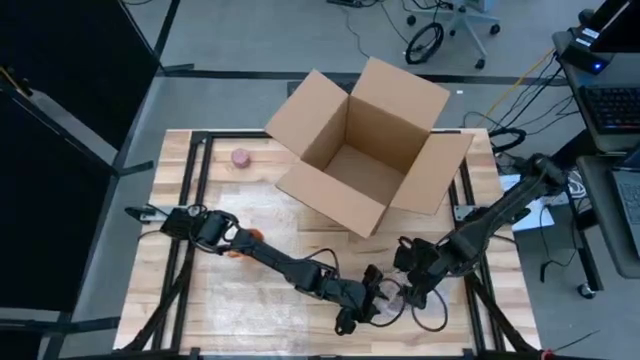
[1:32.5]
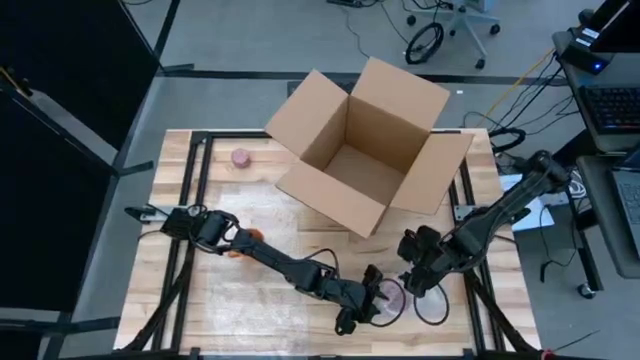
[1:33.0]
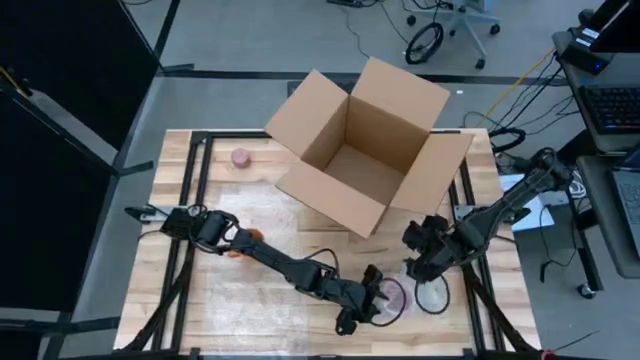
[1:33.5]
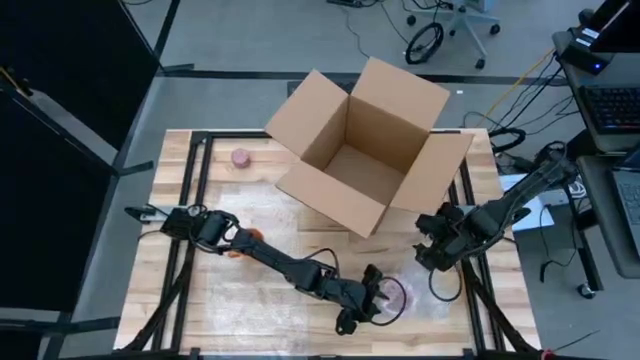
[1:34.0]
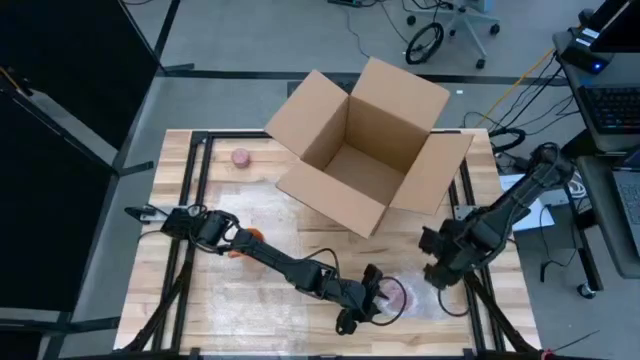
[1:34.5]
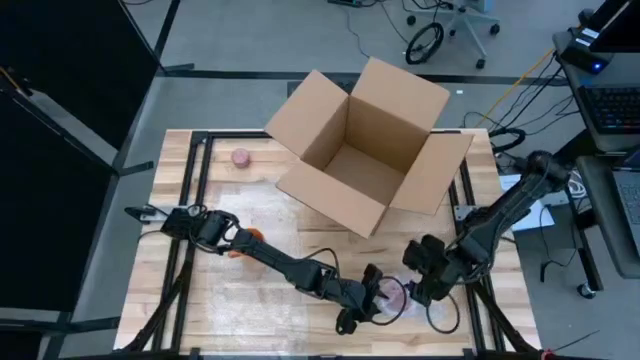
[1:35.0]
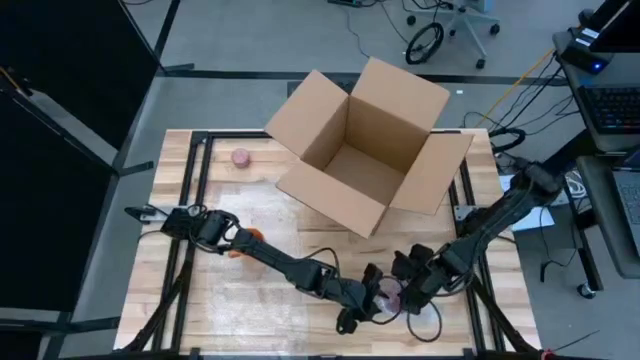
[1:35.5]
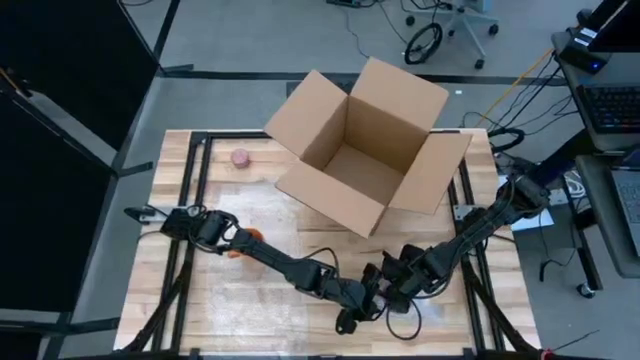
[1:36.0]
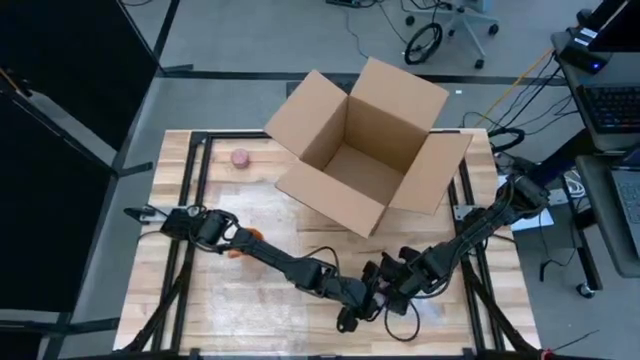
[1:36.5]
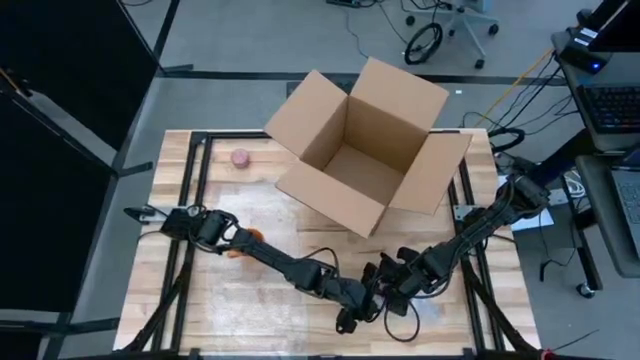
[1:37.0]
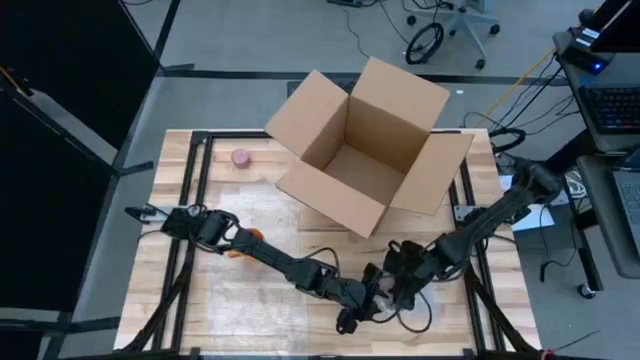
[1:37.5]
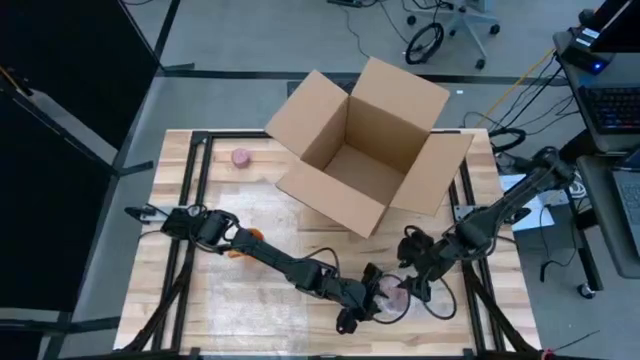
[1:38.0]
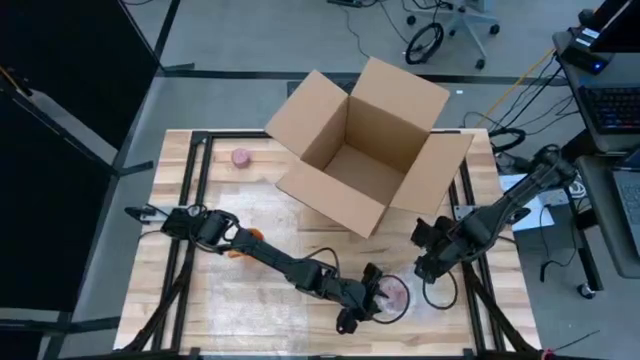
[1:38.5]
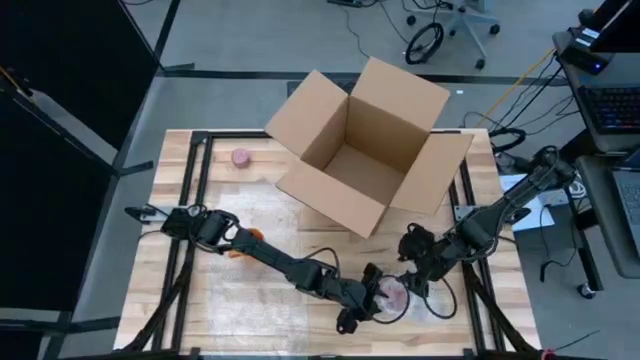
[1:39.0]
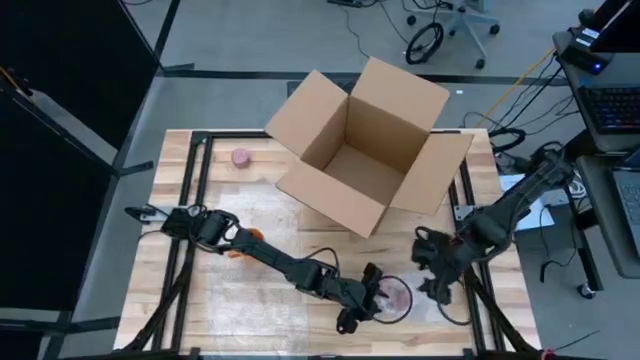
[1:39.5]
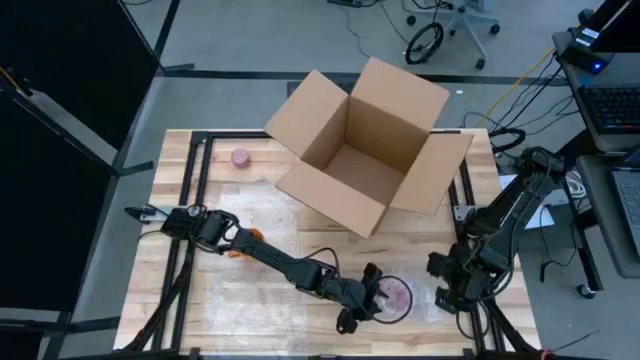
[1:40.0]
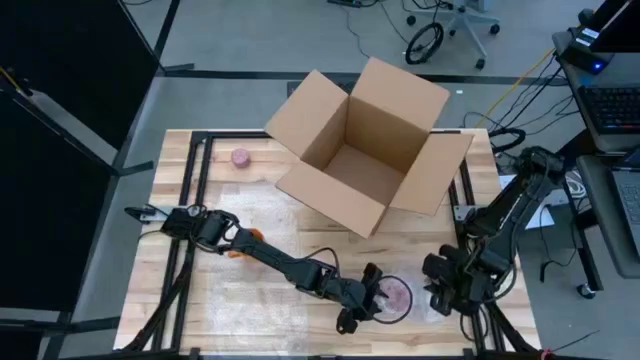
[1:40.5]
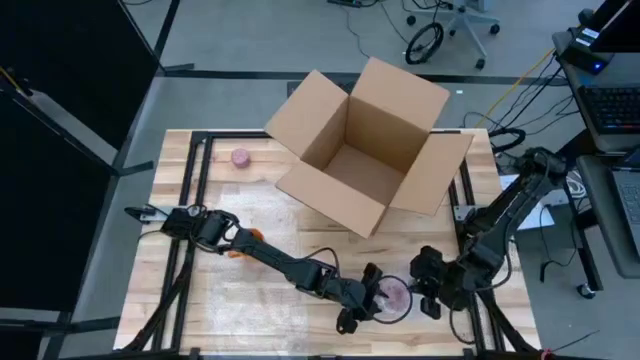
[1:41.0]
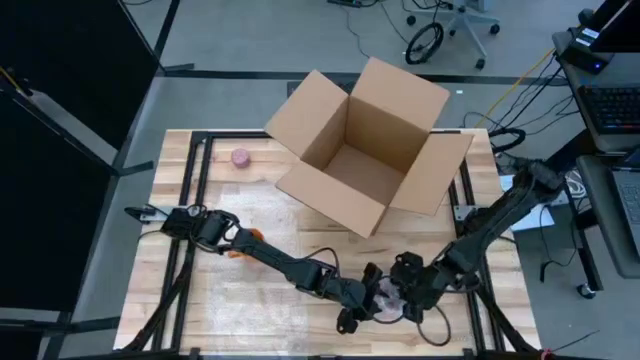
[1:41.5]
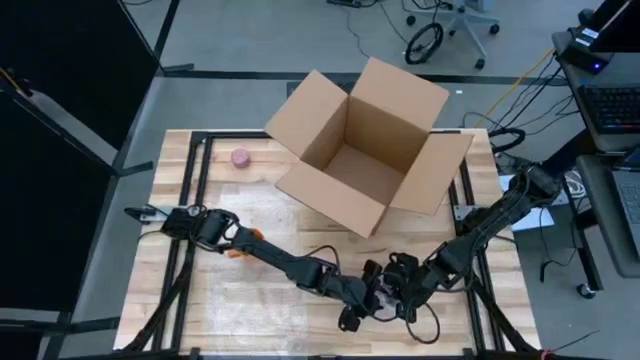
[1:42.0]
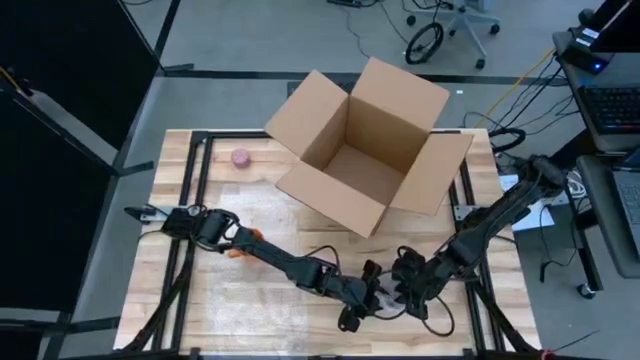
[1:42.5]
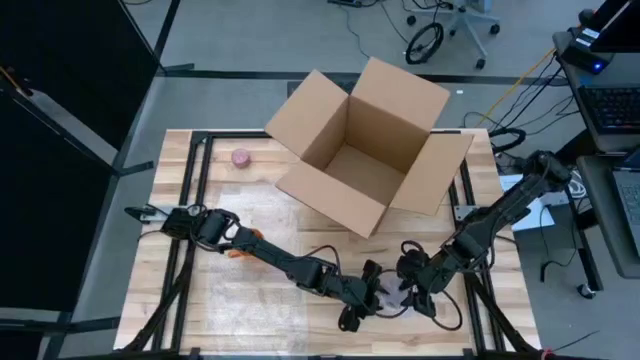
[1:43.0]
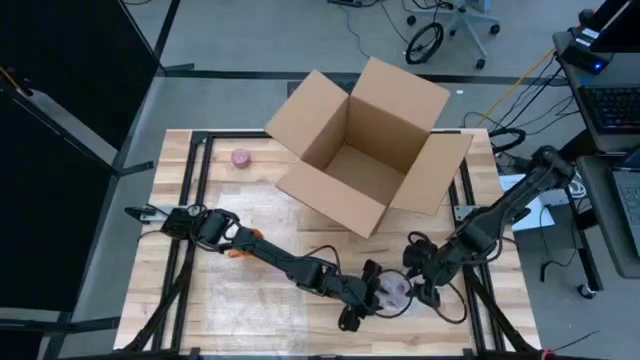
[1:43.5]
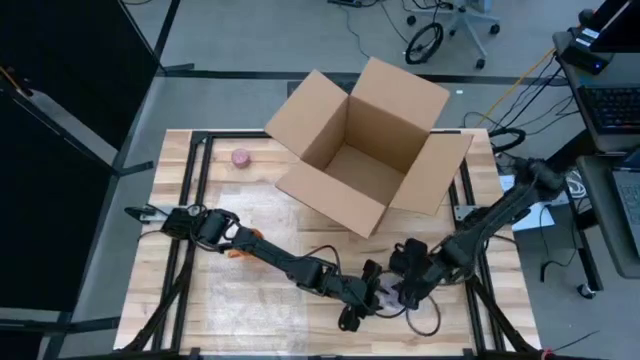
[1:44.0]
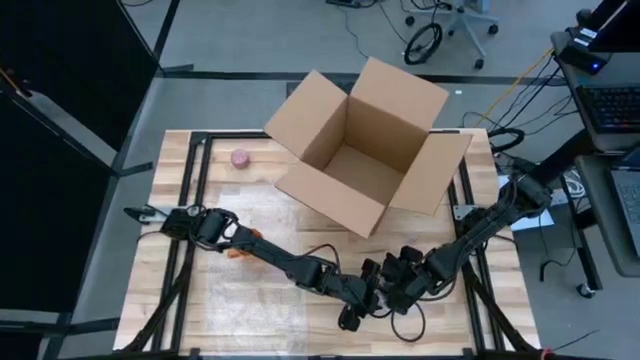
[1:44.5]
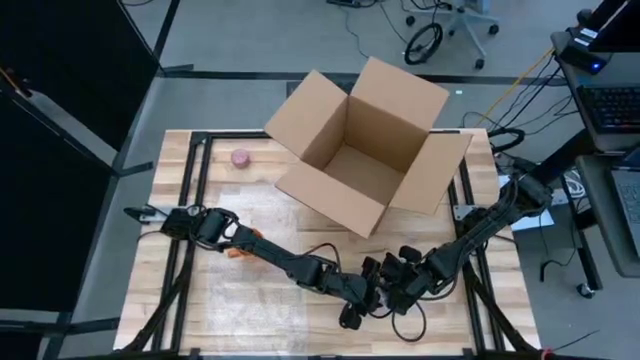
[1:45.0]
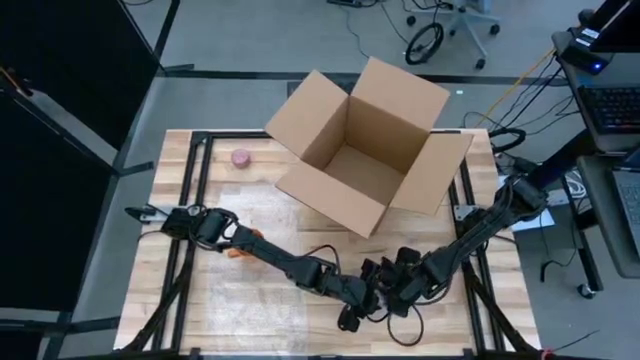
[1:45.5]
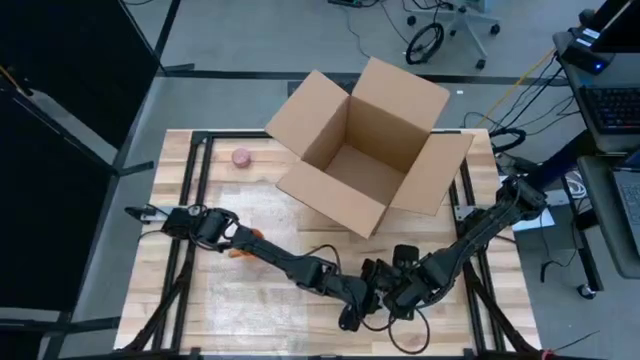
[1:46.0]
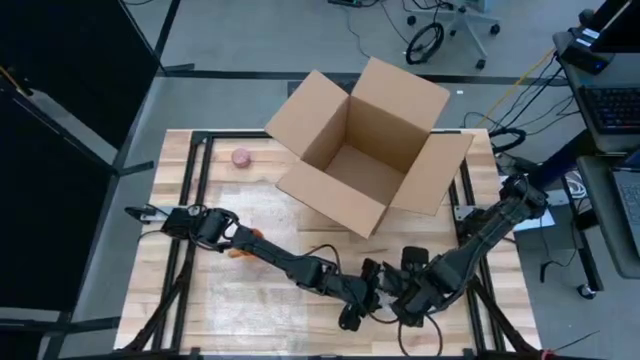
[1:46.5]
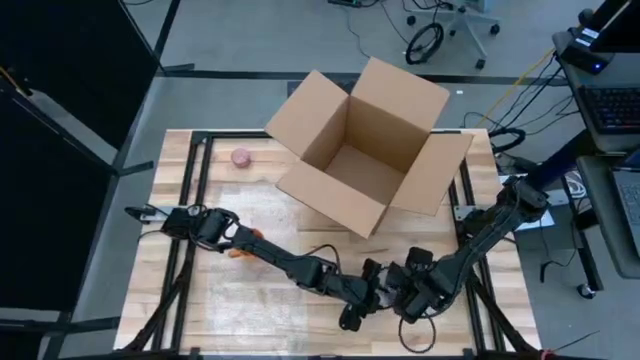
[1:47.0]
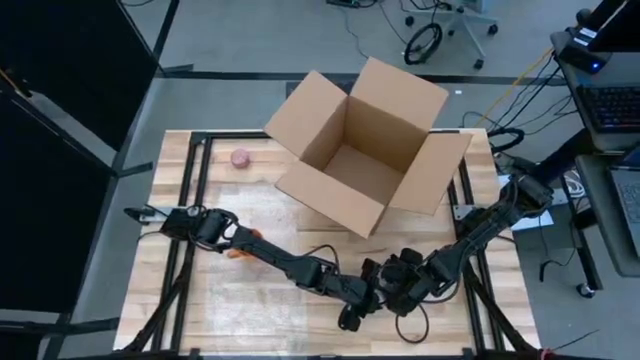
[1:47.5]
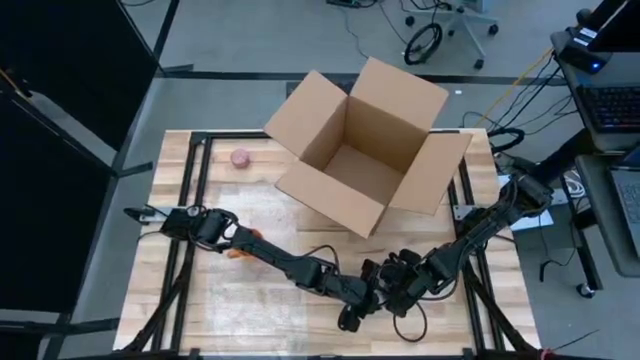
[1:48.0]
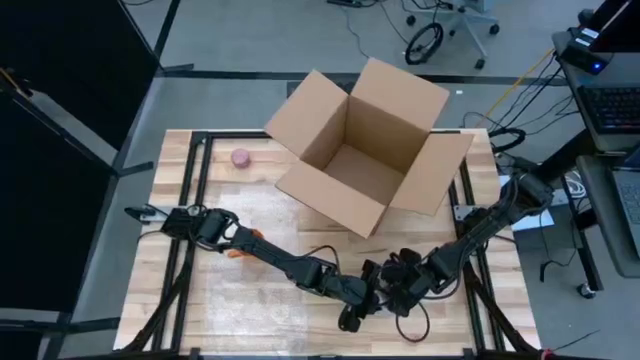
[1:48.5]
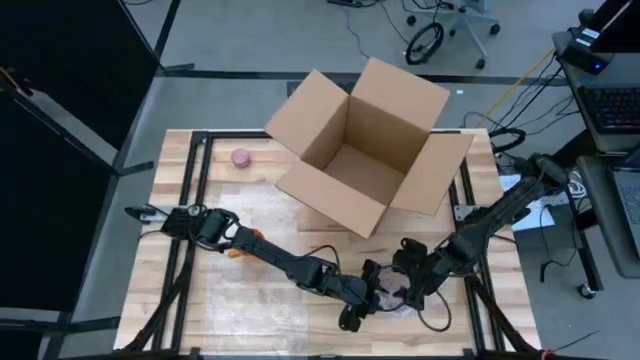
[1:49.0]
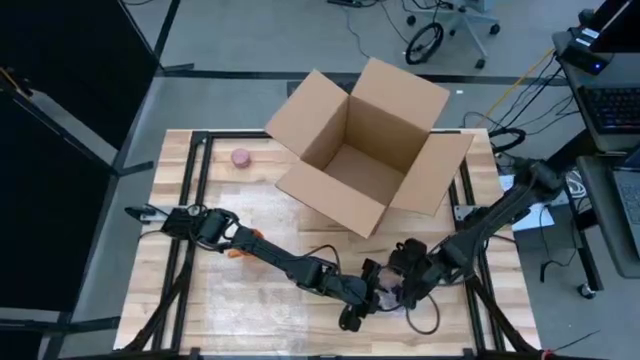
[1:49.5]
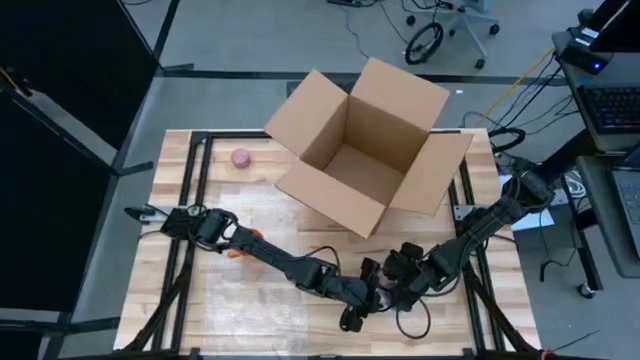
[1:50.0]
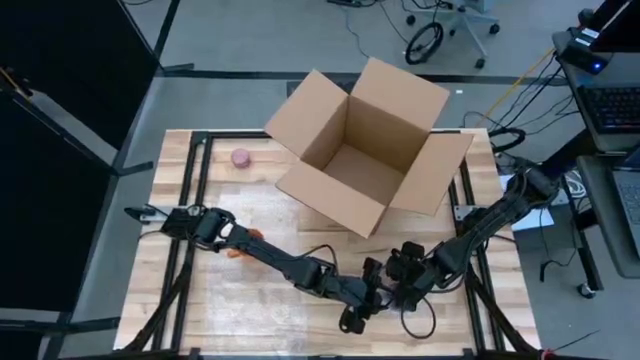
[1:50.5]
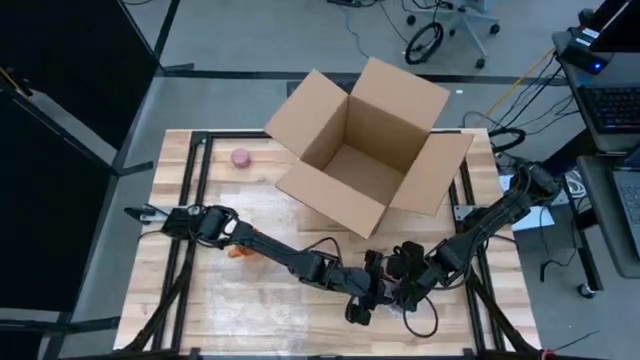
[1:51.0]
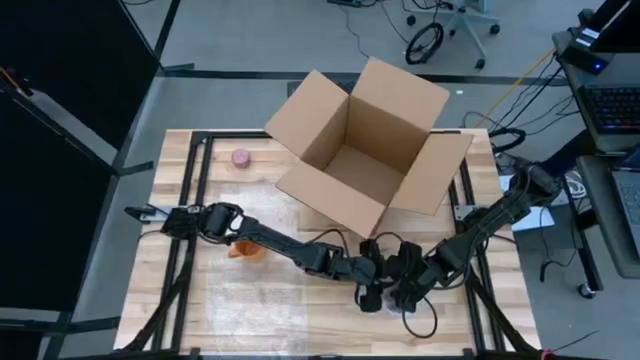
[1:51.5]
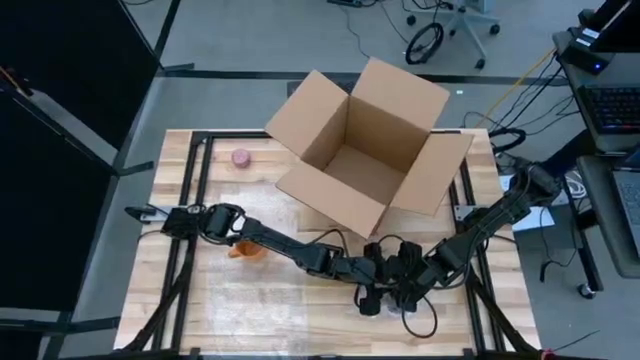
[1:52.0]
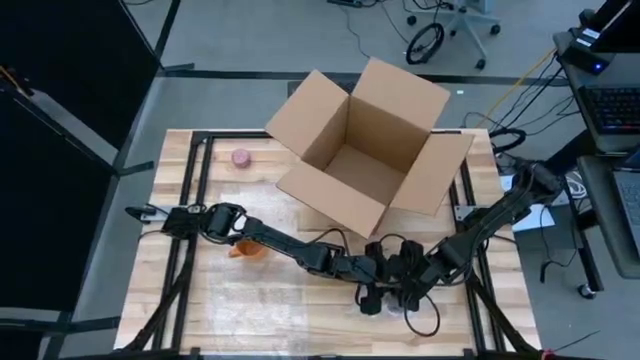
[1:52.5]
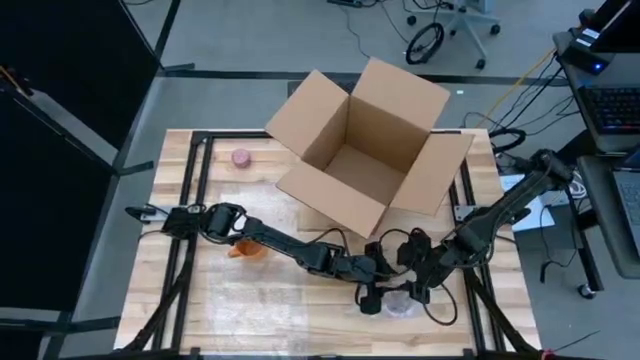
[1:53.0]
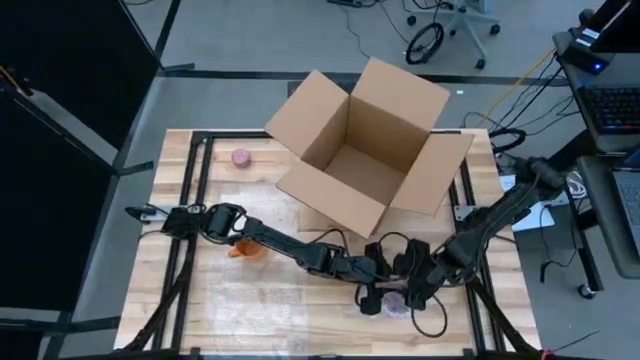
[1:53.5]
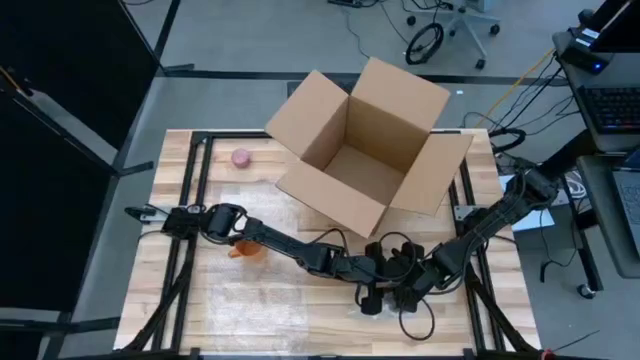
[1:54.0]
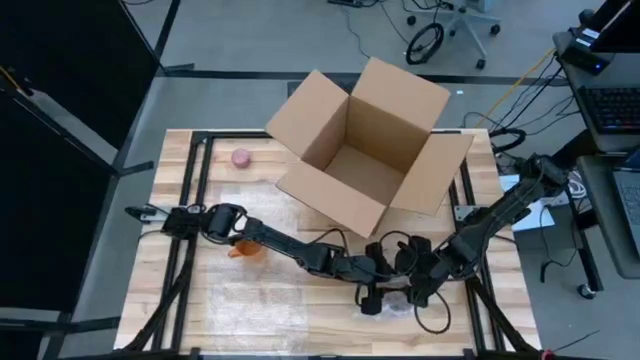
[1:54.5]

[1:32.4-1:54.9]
Task: wrap mug
Wrap the pink mug in the bubble wrap
